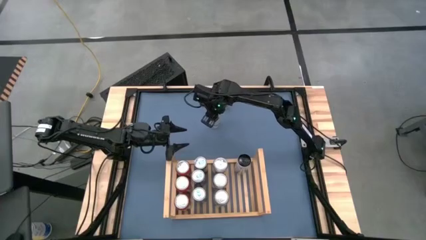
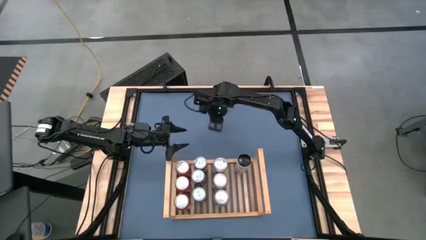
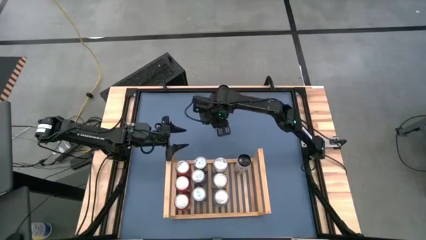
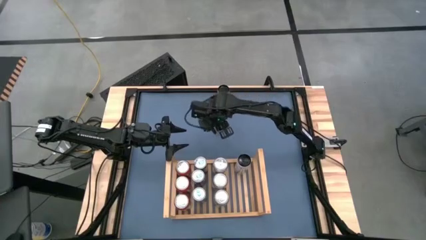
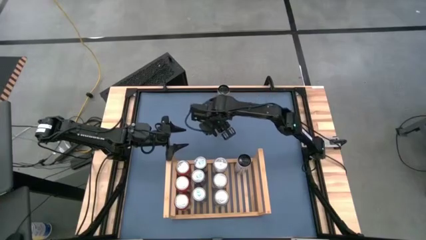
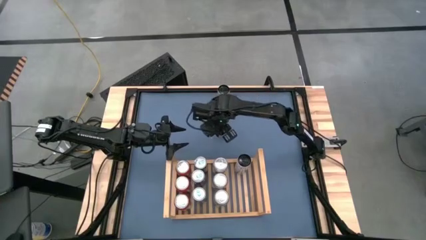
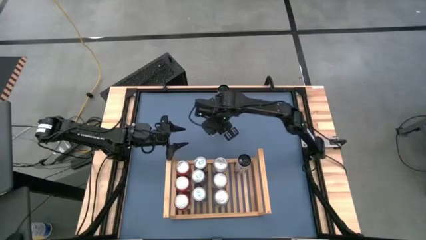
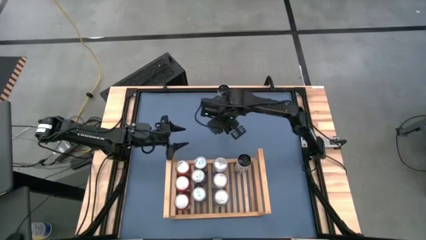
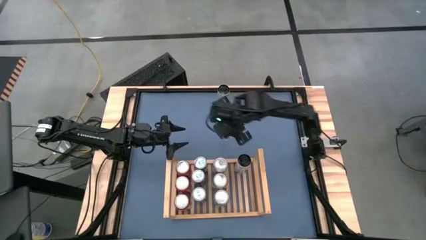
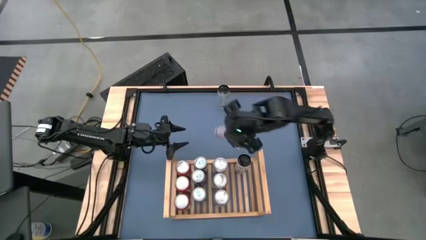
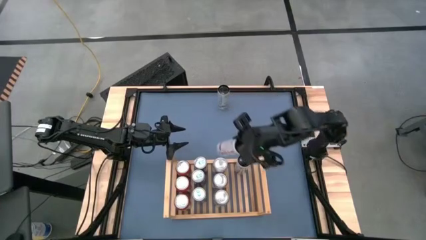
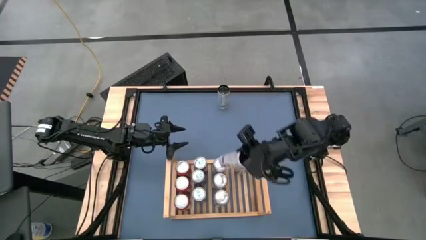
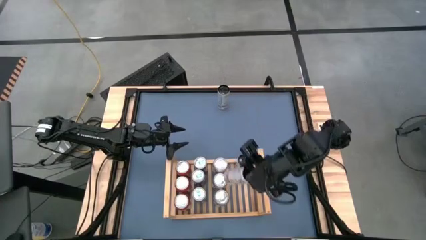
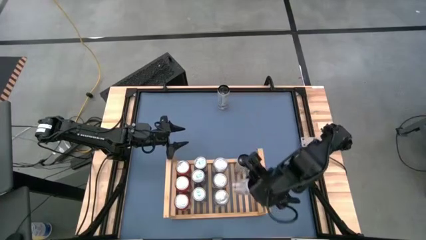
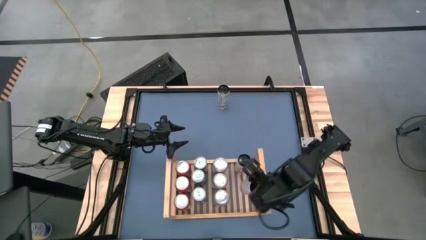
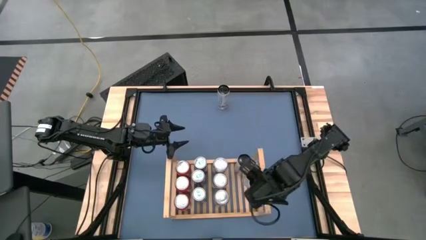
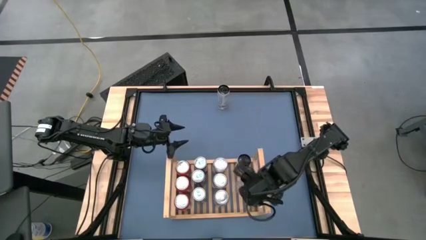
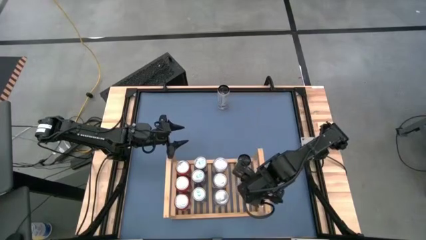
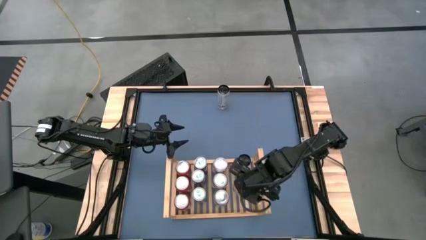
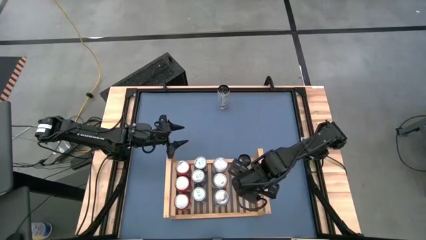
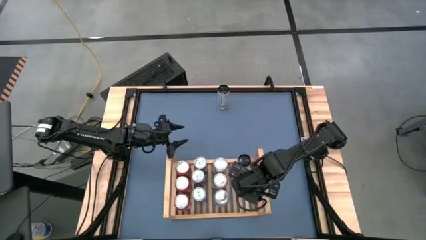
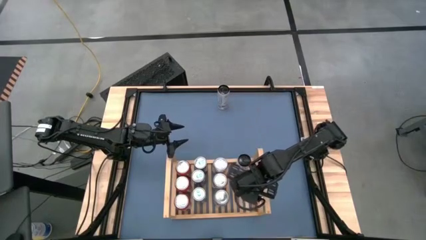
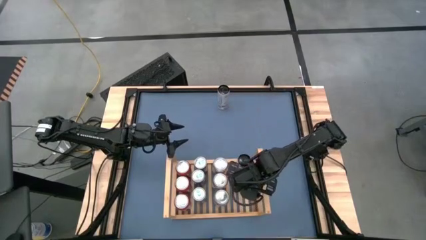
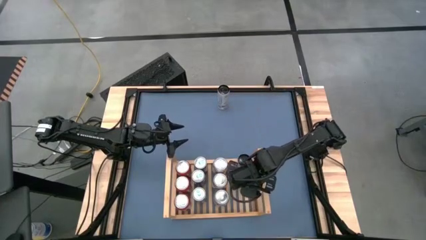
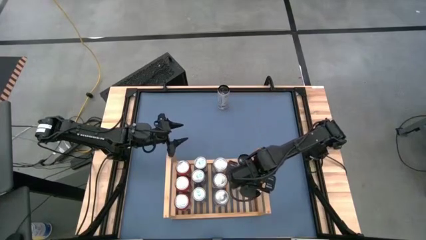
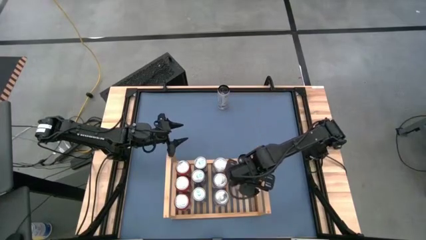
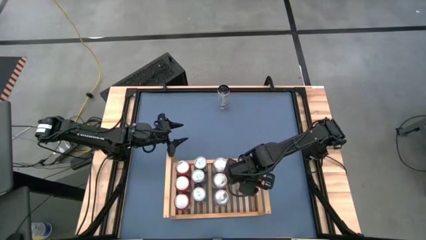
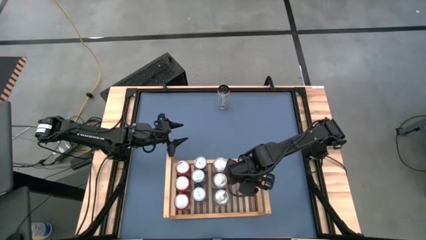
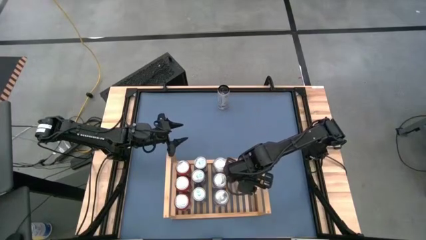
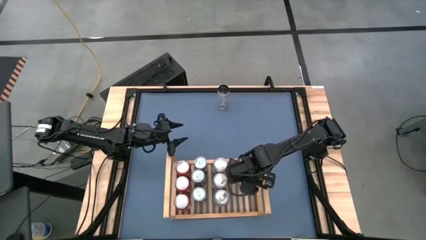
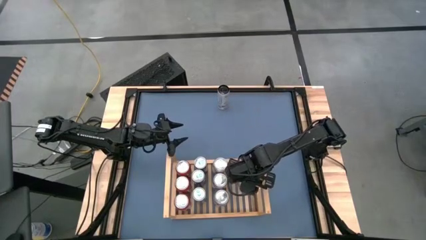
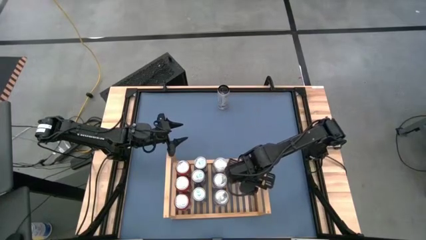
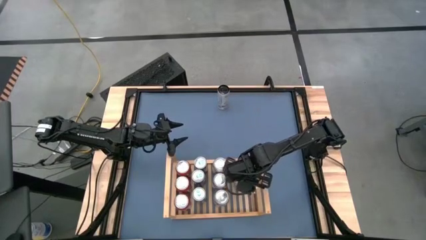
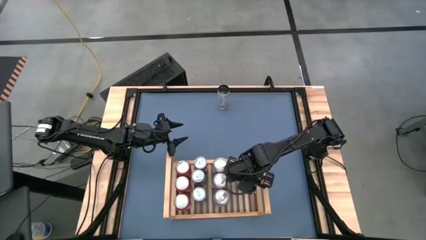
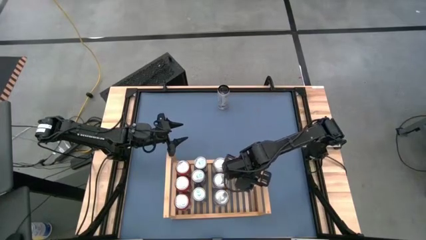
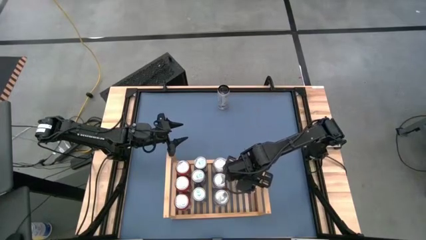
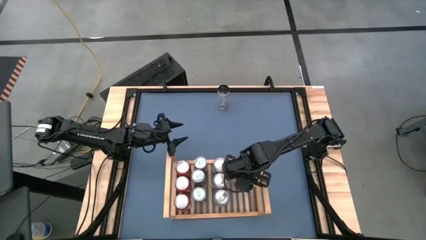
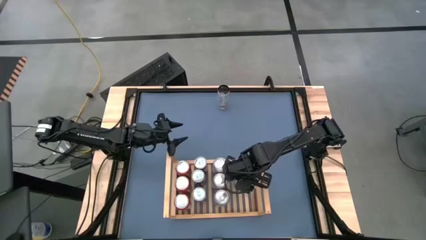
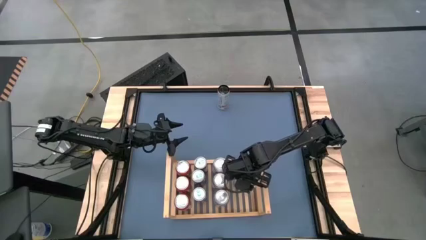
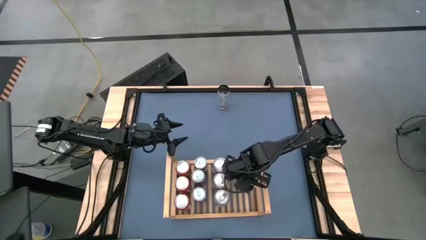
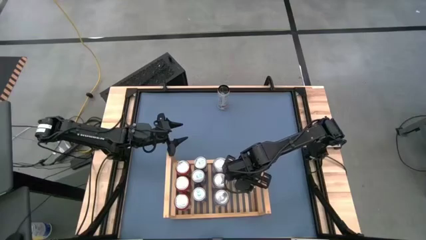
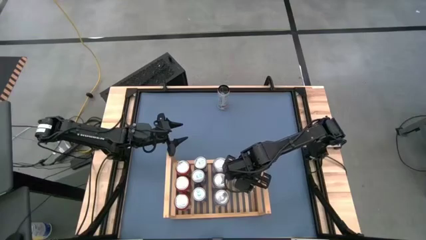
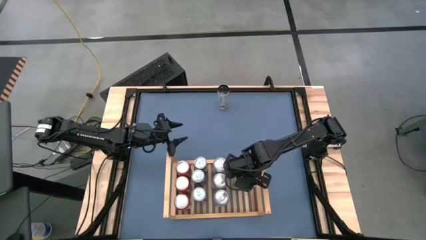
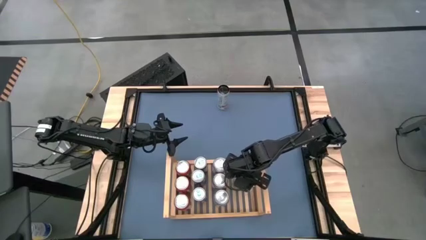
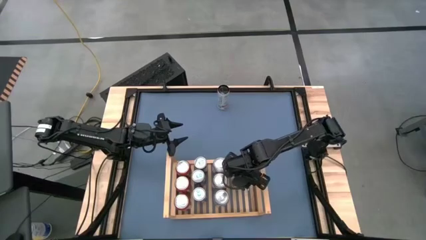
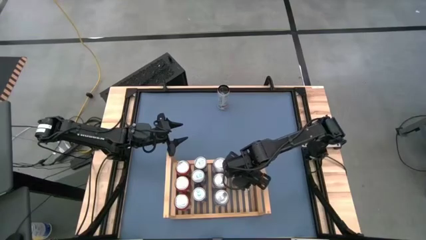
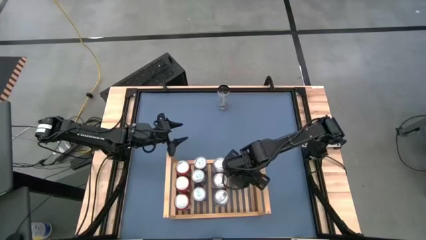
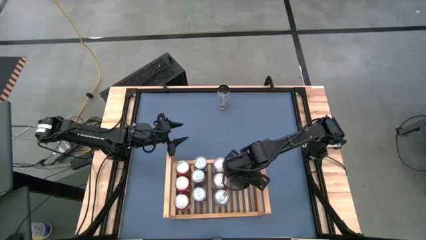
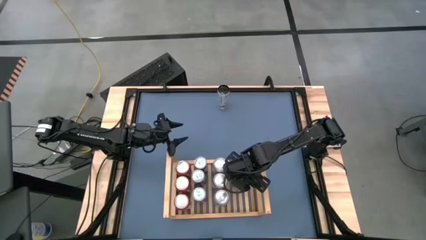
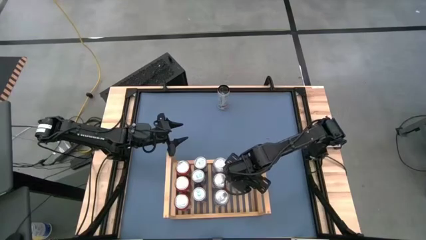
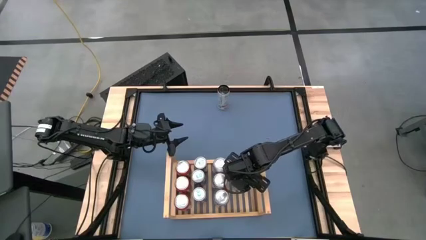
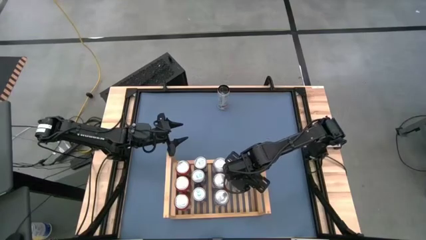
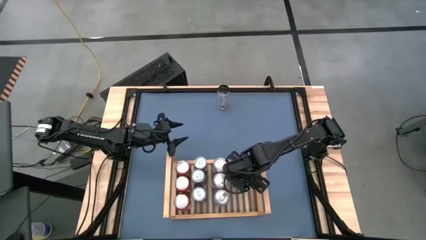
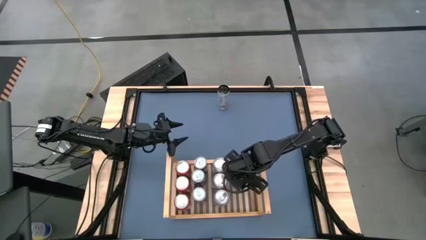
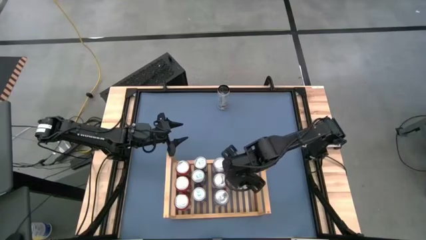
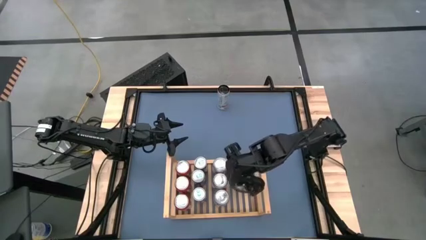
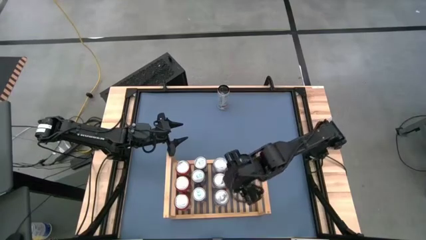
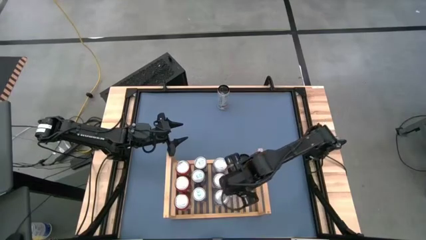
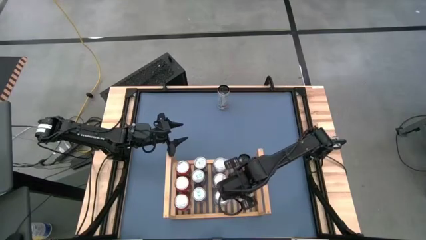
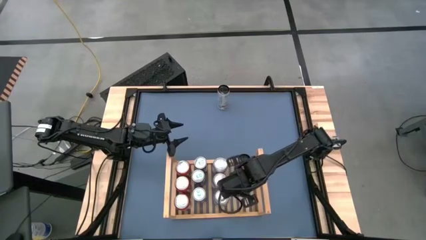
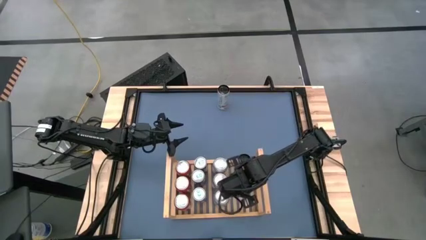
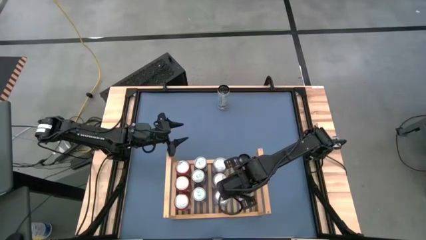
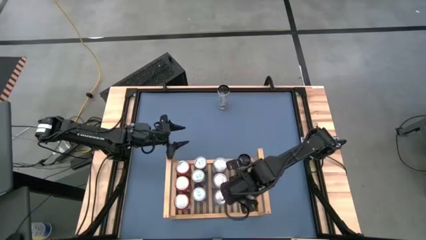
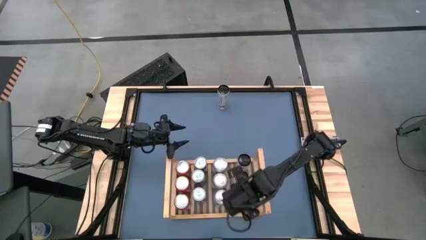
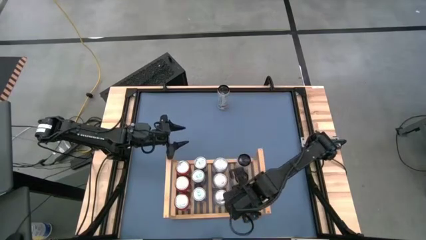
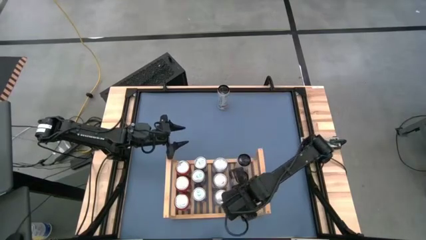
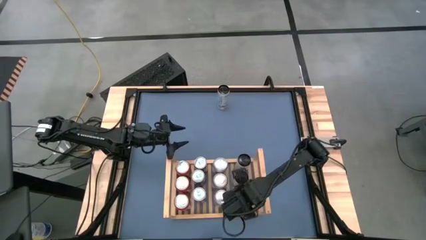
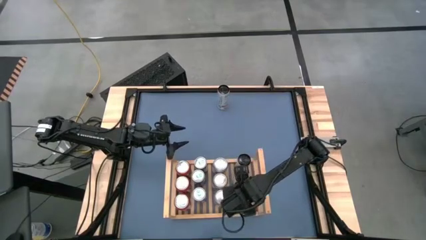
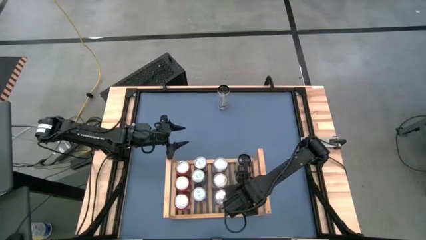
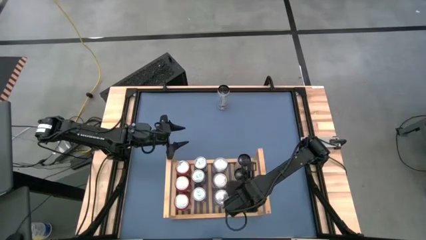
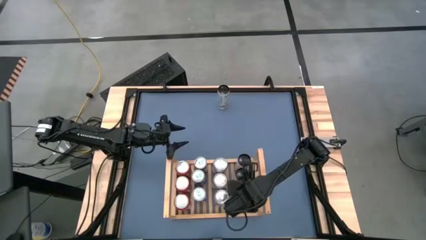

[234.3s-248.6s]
Task: Place canned beverage on shelf
Put the white-pink soda can on the shelf aligned with the other white-pink soda can
